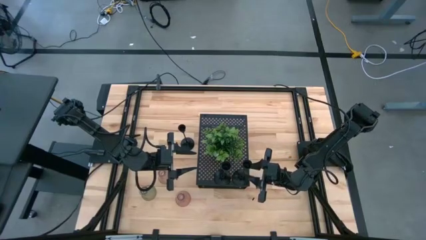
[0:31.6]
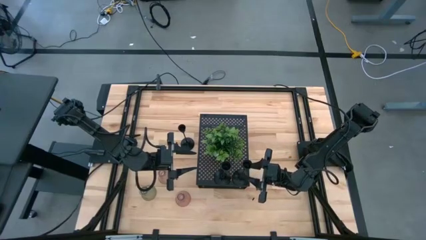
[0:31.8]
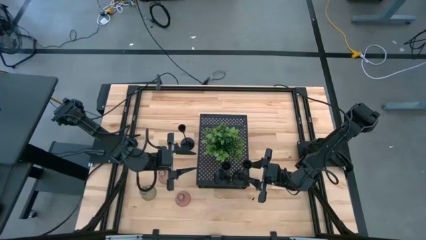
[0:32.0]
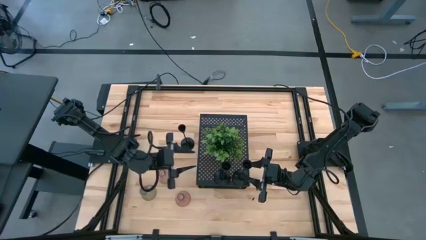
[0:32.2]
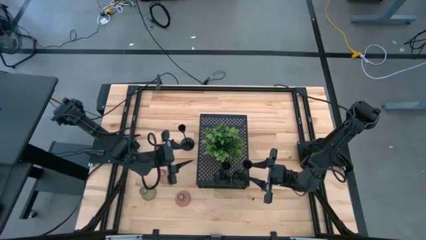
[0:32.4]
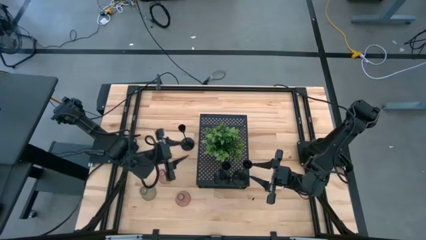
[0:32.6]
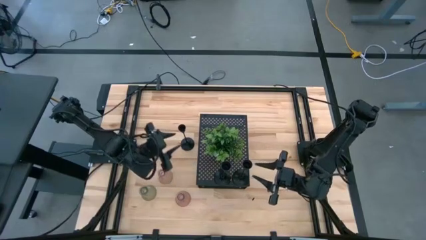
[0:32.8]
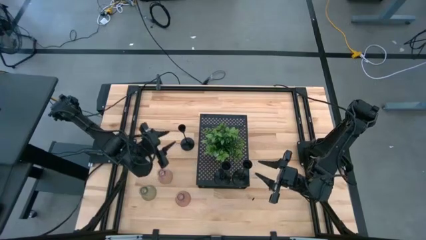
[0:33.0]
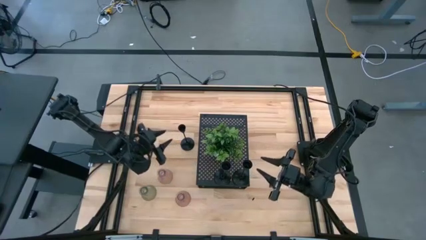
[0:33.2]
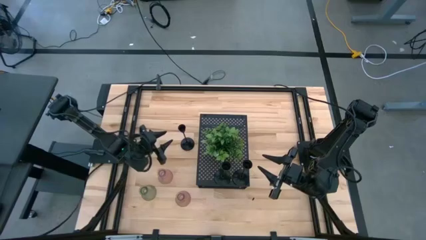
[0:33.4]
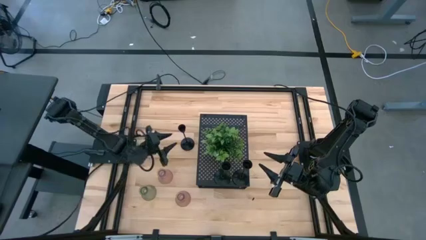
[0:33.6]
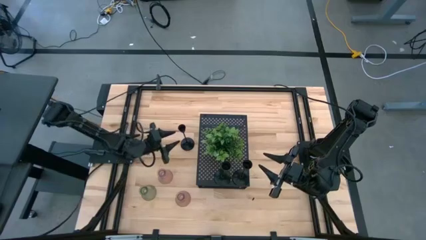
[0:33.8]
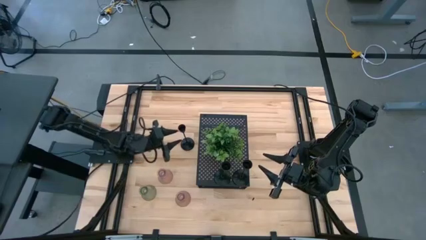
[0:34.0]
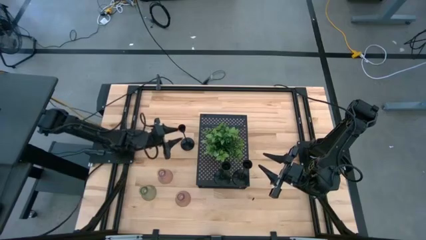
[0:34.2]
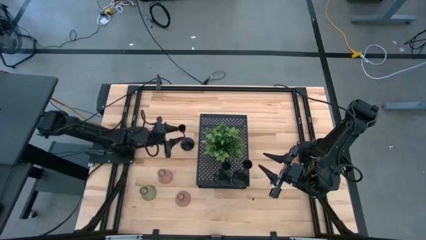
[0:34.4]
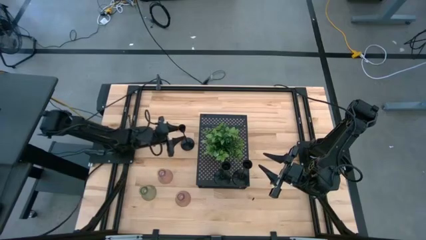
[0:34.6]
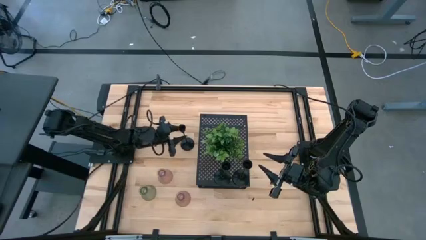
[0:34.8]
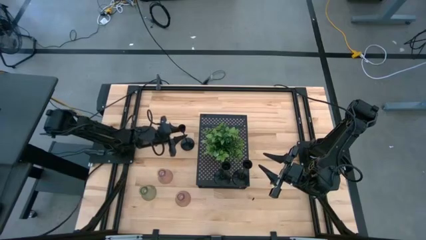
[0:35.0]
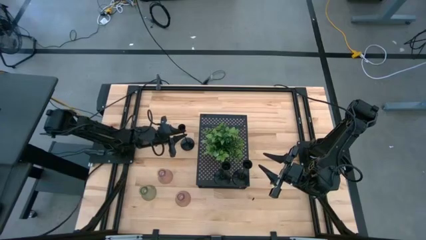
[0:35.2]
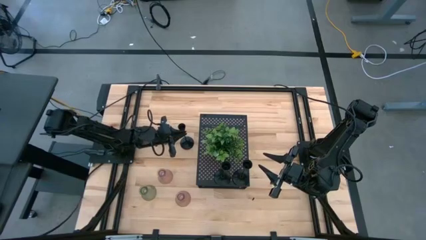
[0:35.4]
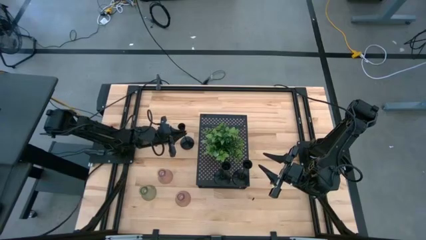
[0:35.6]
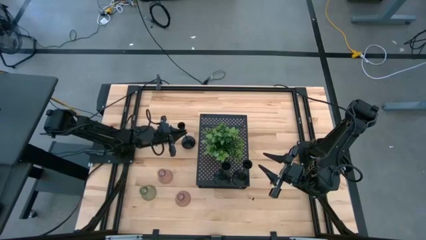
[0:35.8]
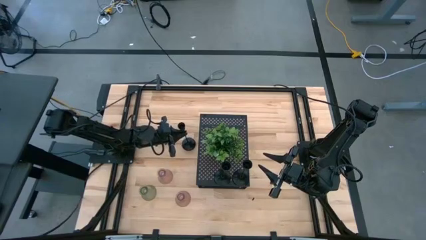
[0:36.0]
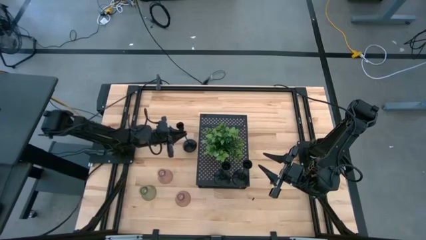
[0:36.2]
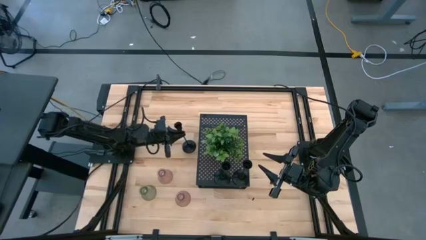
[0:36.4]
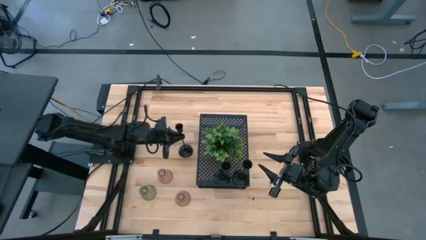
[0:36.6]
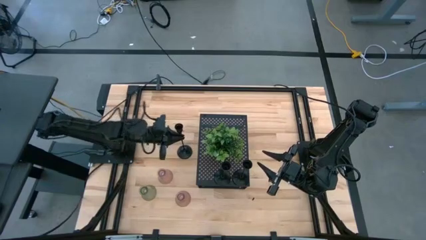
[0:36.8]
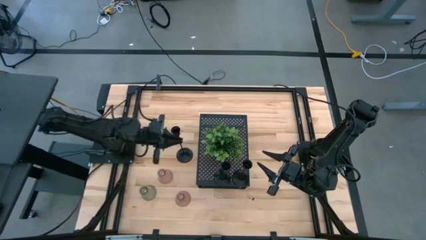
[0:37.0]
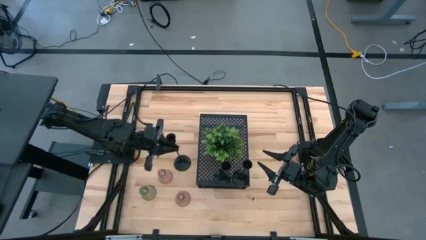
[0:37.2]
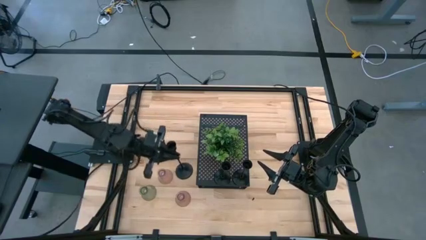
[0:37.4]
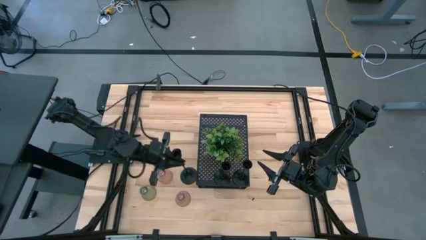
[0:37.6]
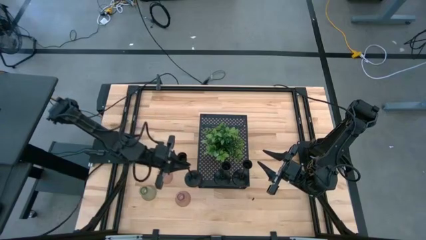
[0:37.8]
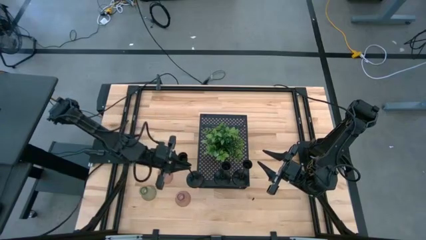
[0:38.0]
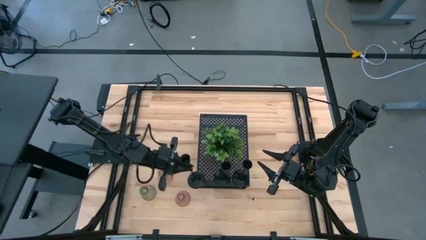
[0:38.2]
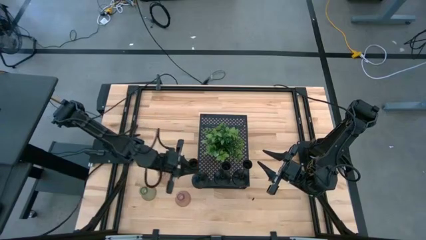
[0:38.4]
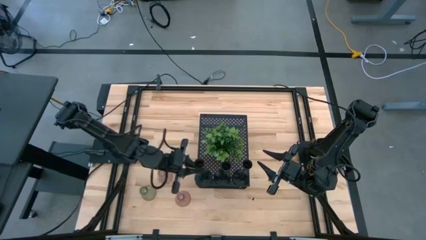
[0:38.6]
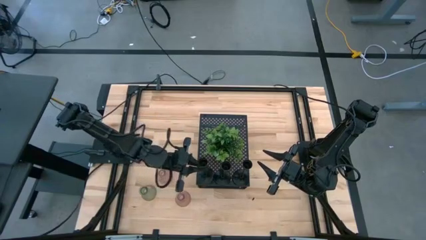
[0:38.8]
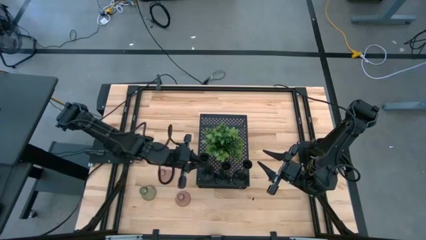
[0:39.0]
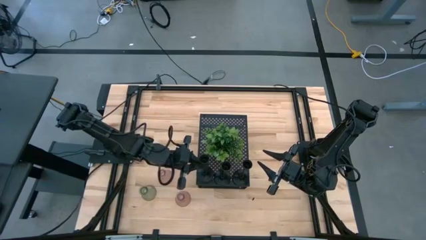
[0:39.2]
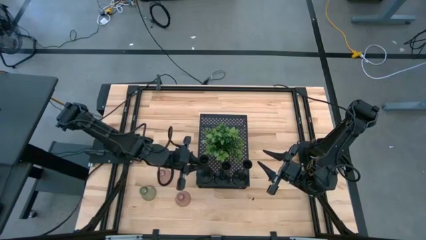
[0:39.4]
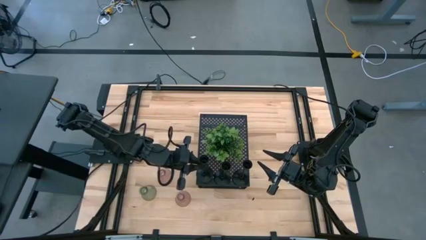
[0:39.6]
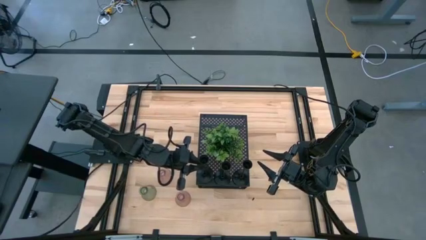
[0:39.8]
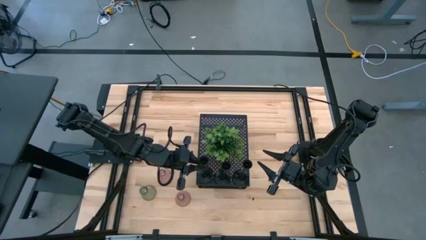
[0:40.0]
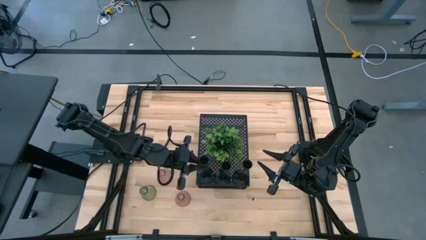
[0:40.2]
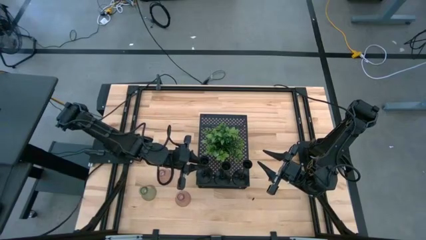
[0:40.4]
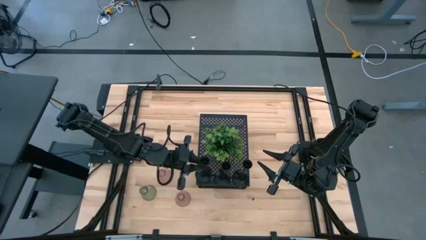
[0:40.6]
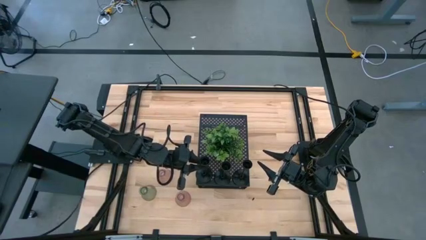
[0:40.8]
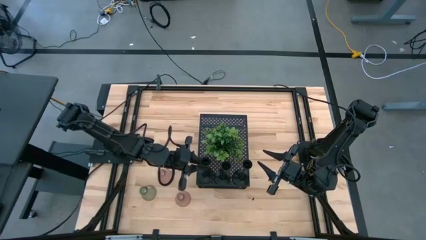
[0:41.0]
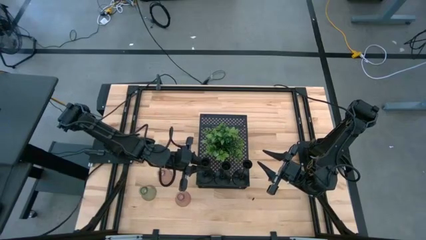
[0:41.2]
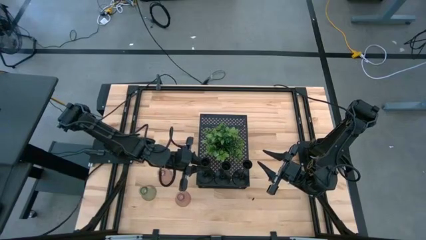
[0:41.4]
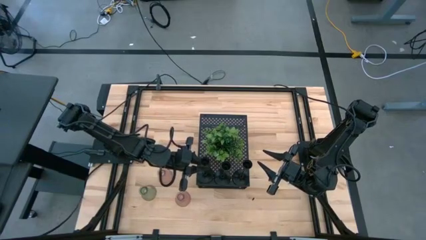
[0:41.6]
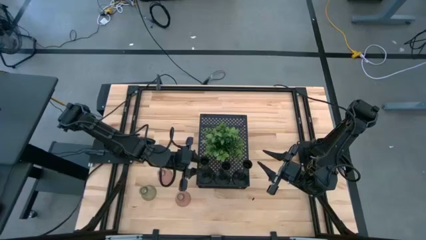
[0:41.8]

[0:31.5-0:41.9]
Task: Pick & Place candle stick holders
Align the black candle holder with the other black candle holders on the shelf

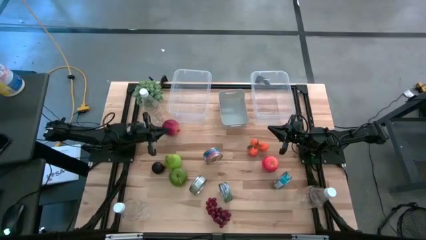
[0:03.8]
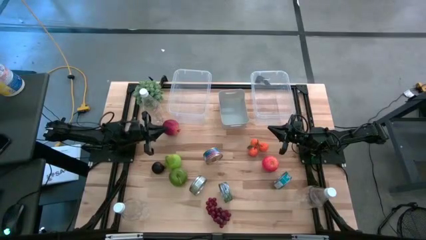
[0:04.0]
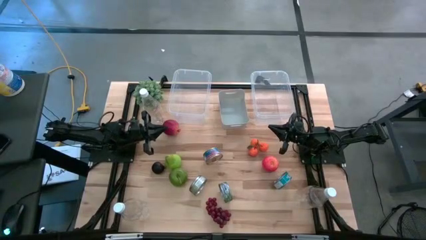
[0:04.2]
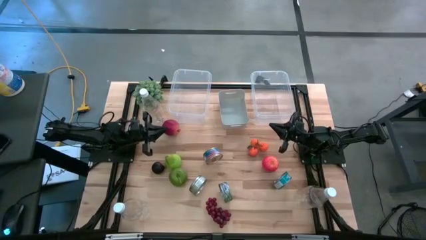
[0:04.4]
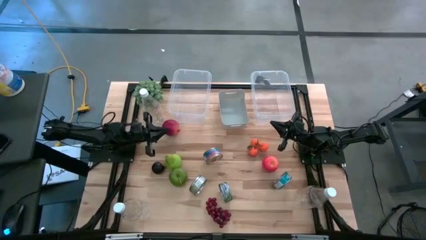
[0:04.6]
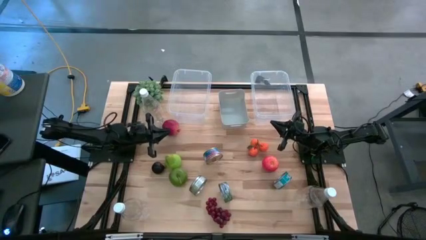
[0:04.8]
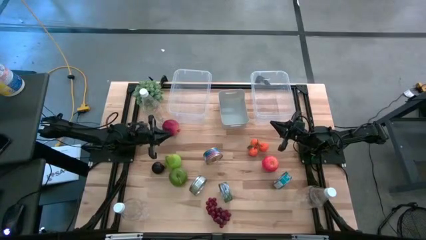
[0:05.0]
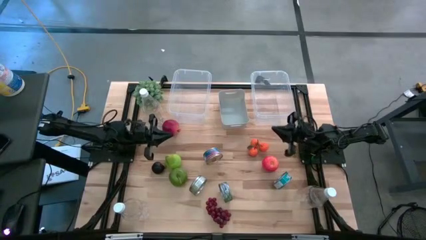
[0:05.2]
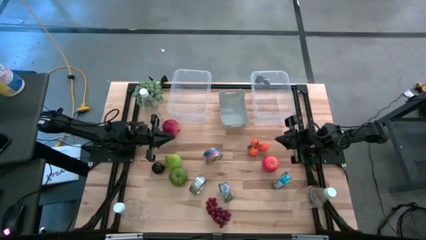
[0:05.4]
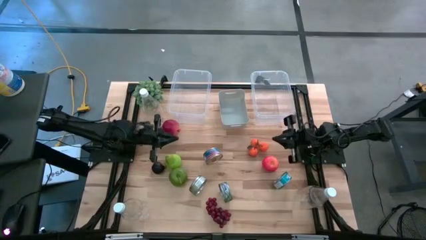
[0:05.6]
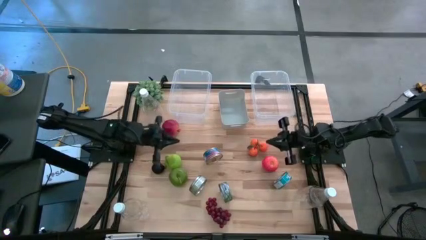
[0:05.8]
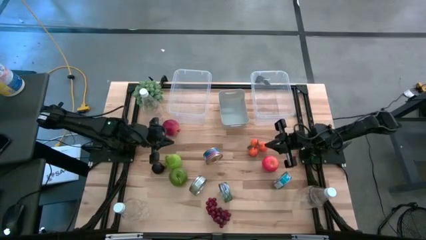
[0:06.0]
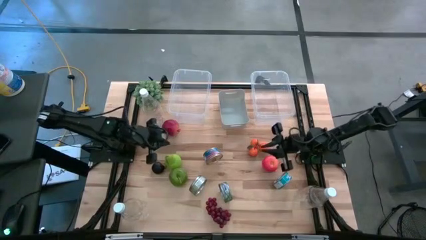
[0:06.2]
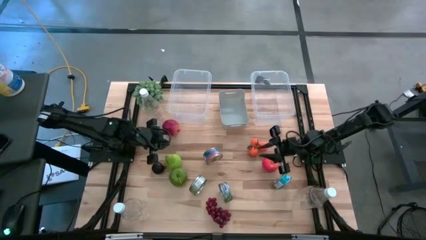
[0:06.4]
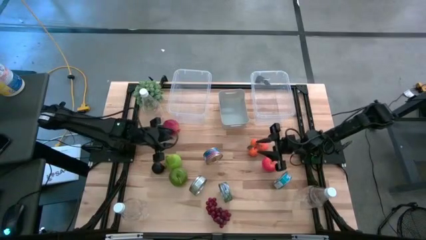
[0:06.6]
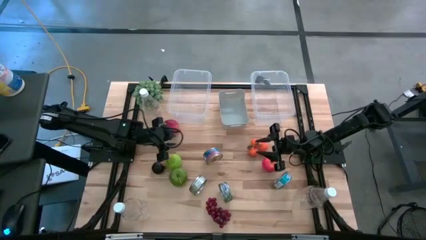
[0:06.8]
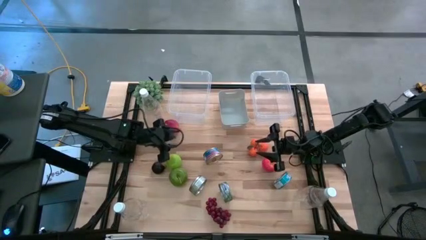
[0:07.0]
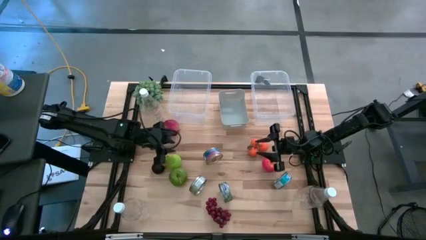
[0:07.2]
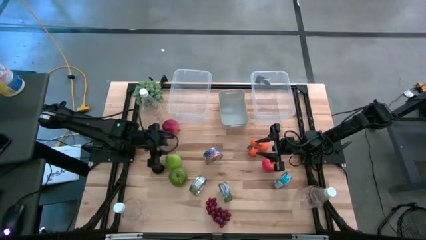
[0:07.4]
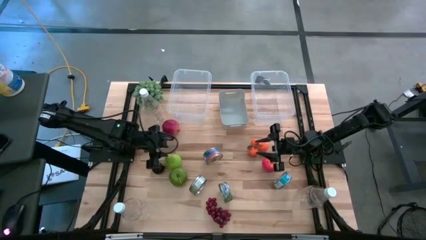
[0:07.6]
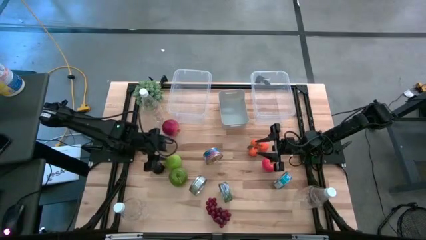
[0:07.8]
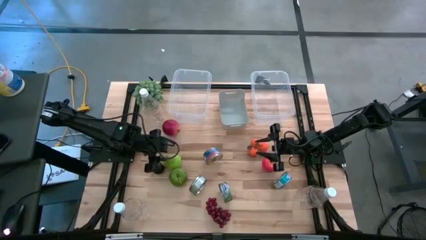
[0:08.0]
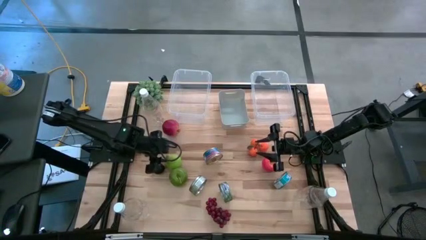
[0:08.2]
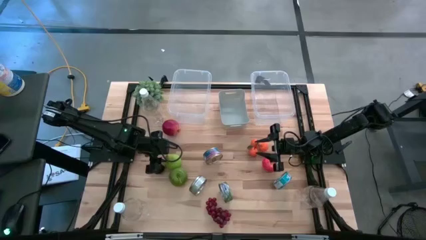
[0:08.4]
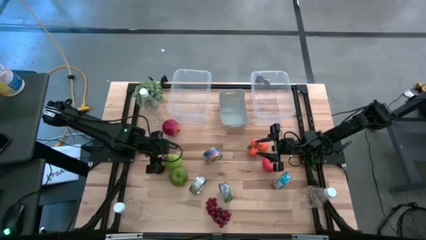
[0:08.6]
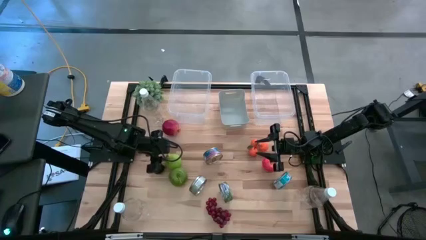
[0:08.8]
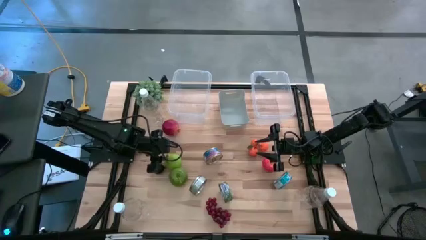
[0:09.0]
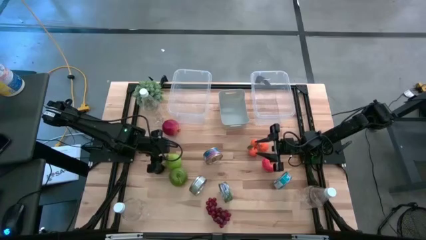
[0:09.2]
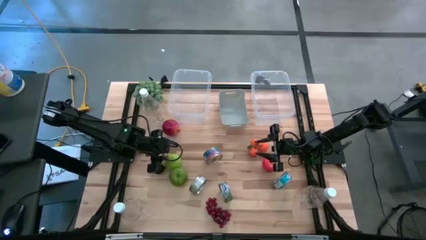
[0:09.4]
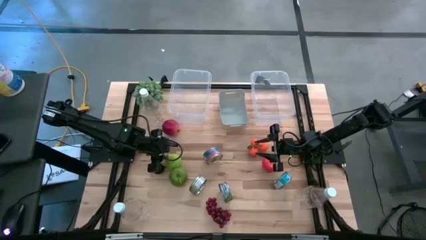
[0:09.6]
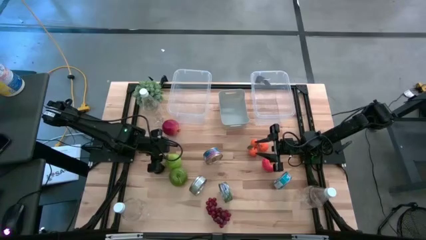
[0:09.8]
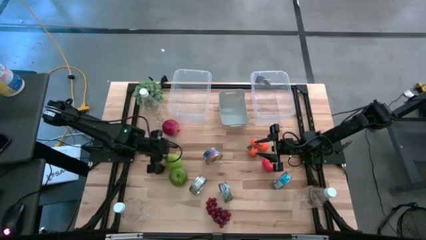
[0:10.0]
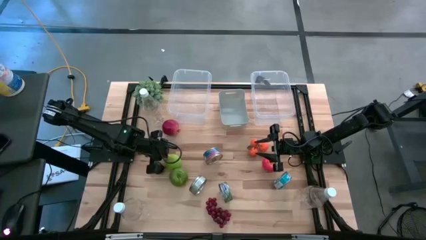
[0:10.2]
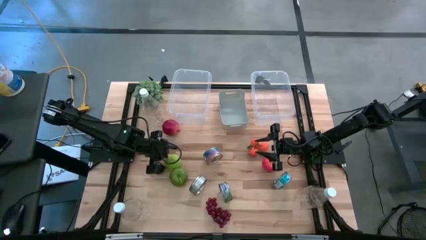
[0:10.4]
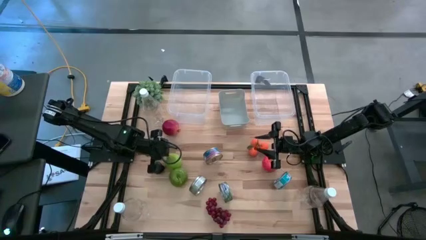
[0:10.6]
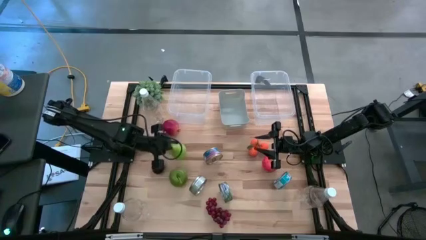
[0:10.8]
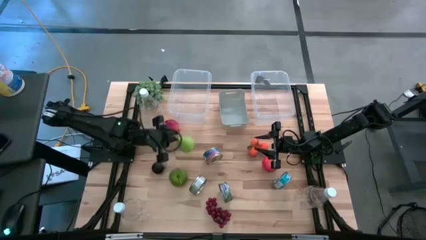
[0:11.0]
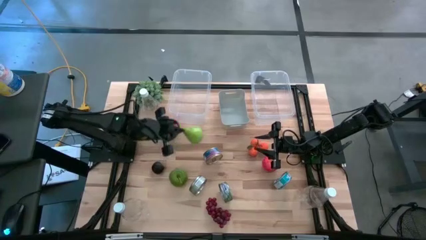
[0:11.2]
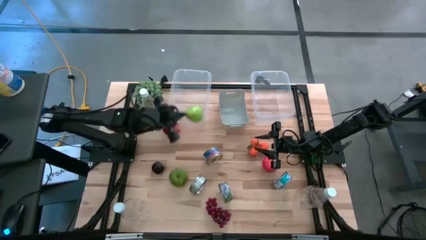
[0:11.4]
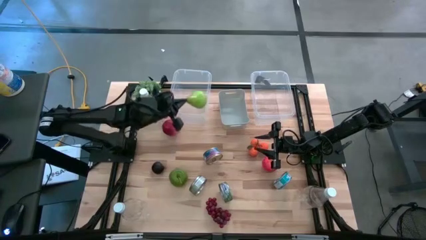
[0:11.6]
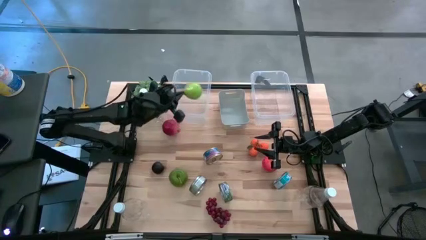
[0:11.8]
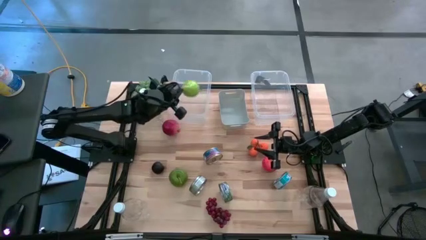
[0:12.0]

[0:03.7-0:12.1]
Task: Pick & Place Food Item
Put the pear into the left transparent bin
